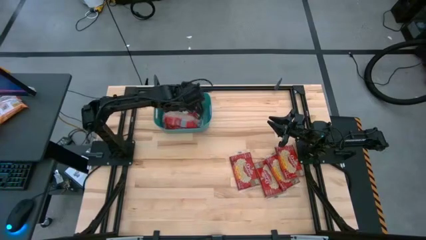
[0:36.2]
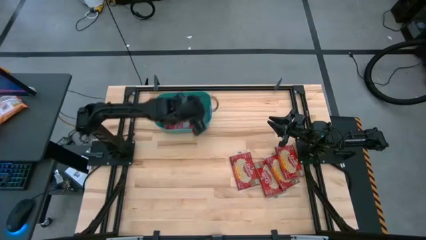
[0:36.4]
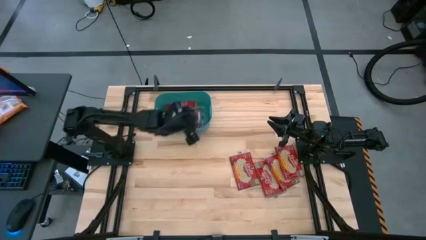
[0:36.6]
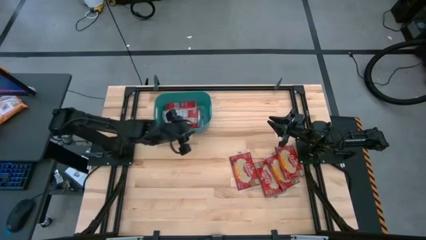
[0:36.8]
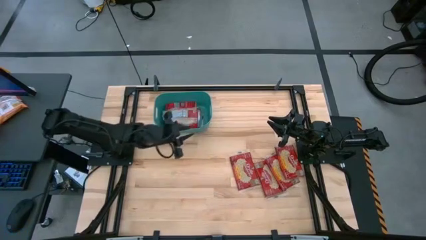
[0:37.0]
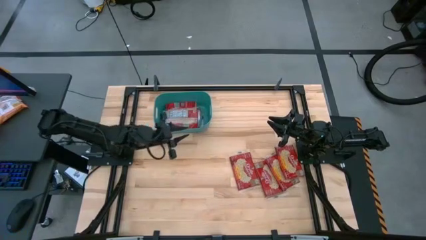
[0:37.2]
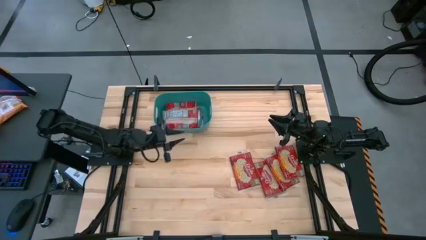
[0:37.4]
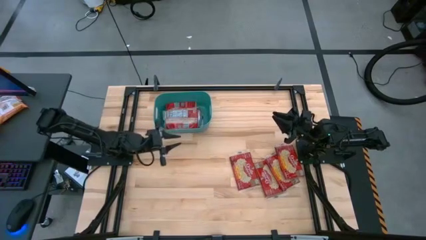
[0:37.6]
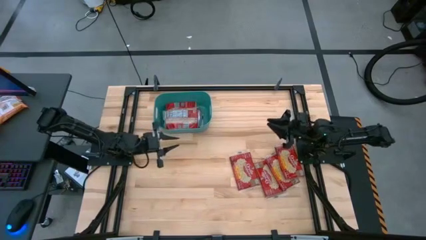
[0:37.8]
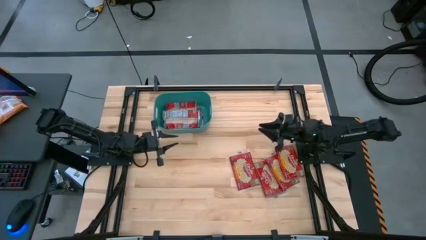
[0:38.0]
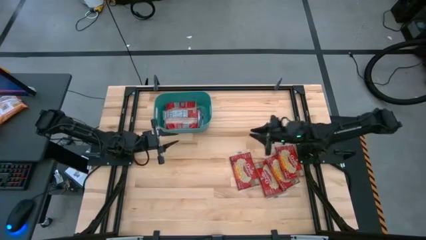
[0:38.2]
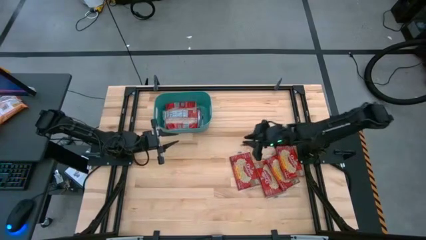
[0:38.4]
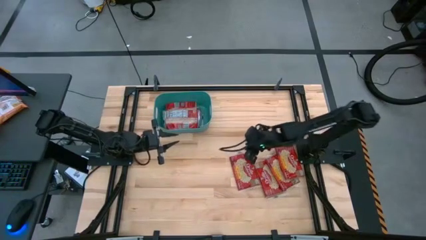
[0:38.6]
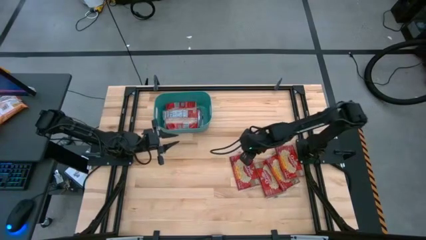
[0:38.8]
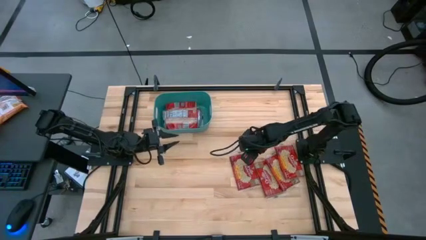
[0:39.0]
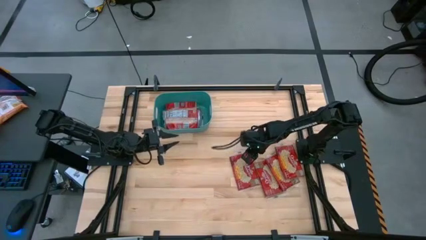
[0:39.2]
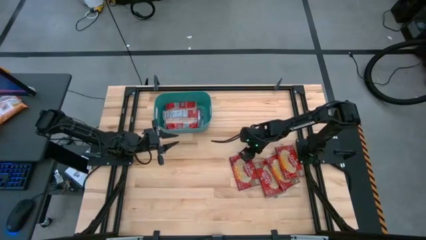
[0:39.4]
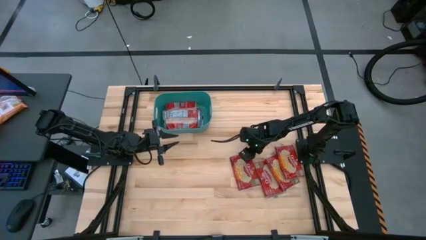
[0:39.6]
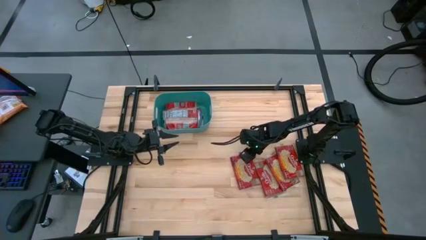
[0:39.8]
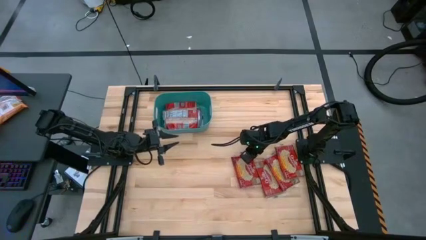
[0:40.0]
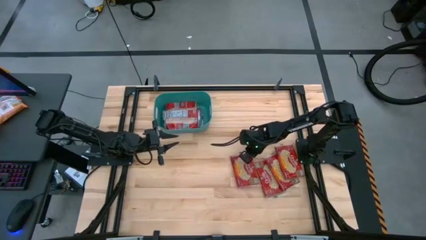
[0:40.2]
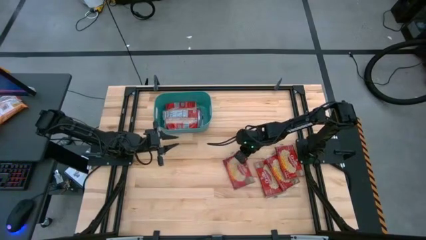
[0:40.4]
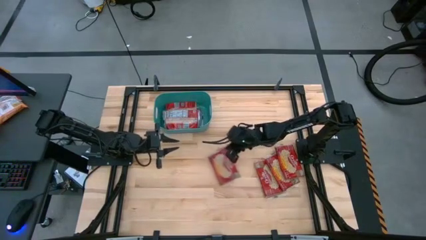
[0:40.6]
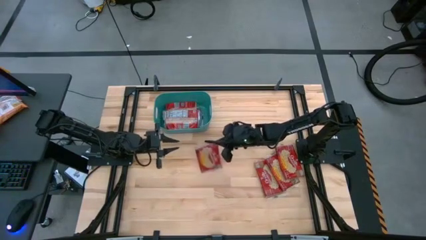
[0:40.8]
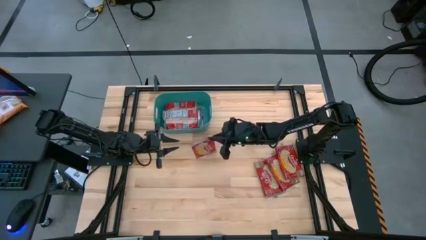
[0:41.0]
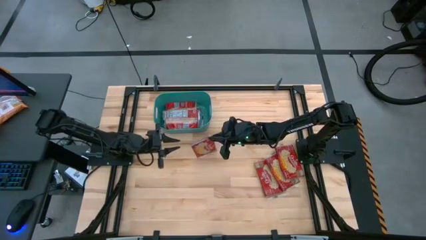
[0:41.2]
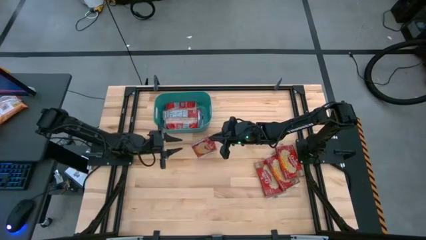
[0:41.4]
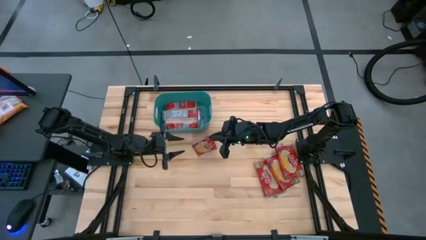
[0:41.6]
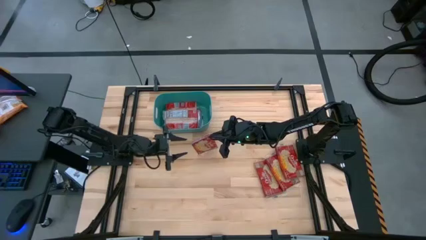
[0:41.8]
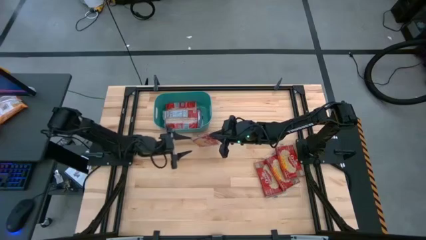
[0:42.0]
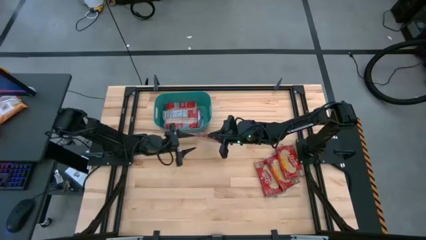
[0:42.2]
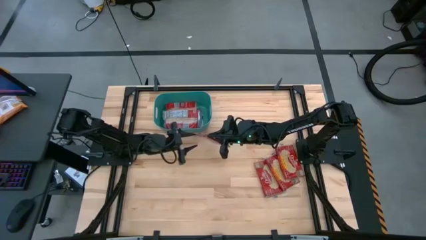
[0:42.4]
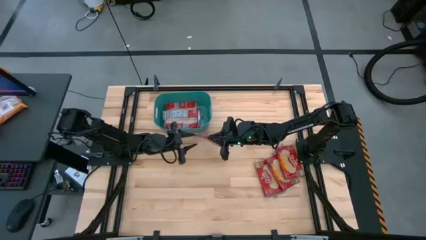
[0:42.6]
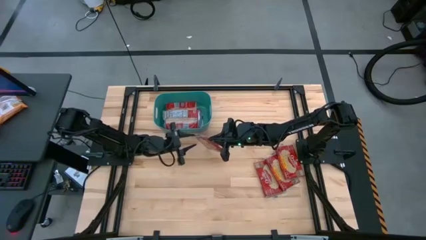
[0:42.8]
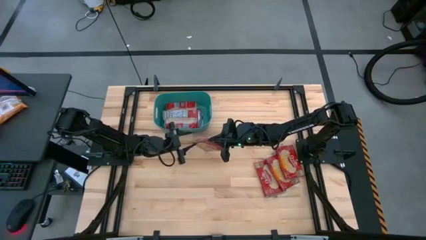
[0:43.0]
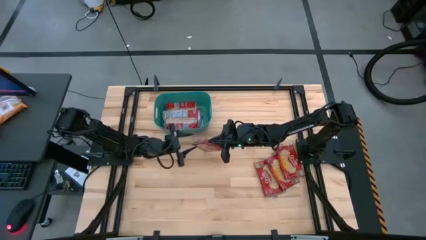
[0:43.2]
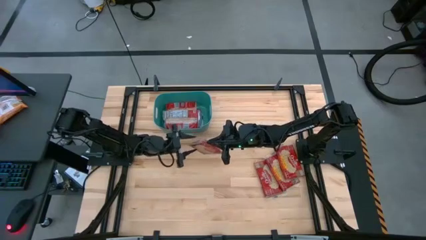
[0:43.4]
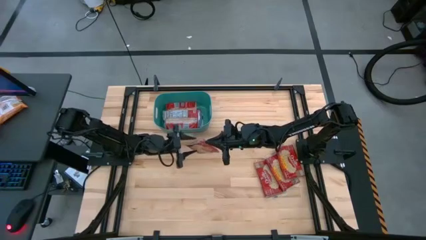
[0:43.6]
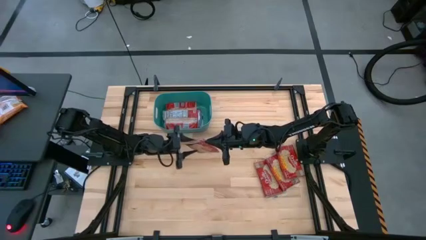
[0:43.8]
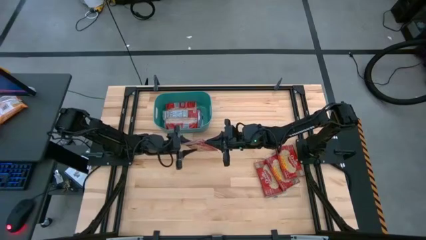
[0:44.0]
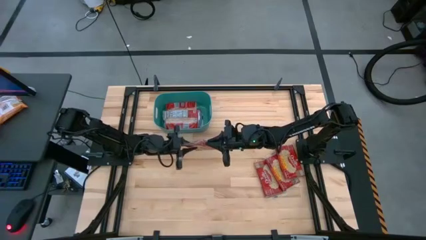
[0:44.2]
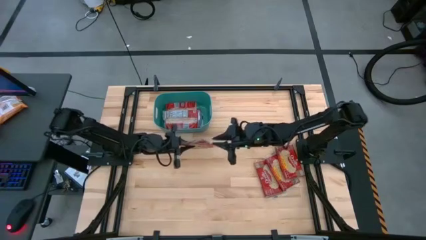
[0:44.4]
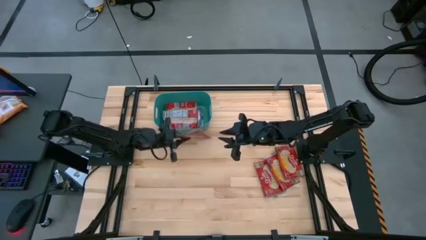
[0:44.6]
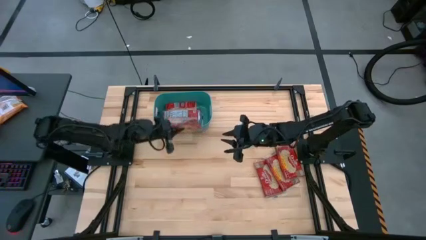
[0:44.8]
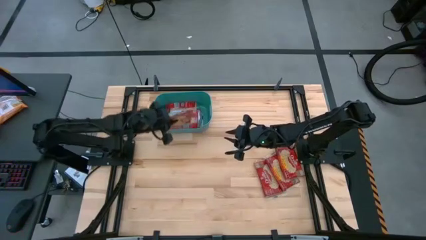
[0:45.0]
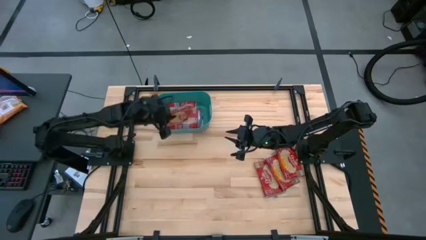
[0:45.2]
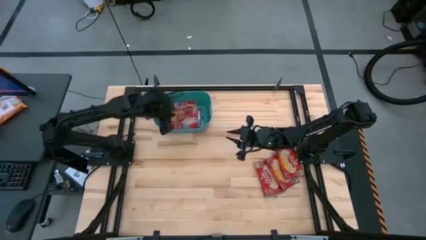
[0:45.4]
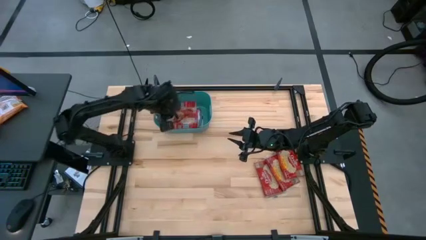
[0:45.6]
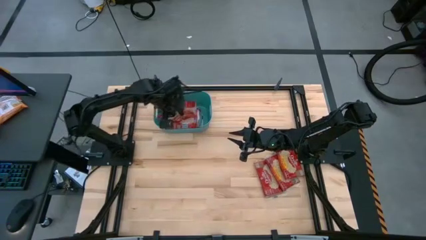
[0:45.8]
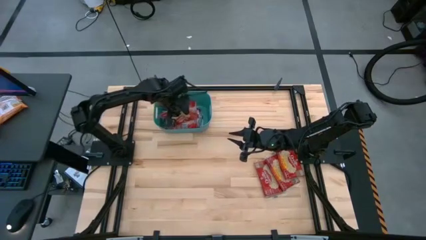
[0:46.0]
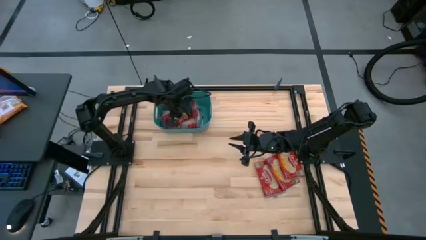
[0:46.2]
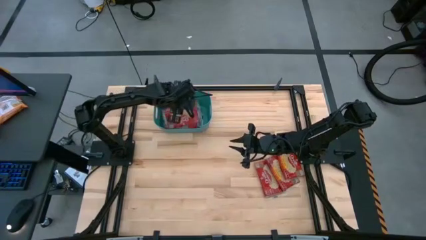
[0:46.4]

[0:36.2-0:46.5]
Task: Sort popcorn bags into baskets
Put the popcorn bag into the green bin

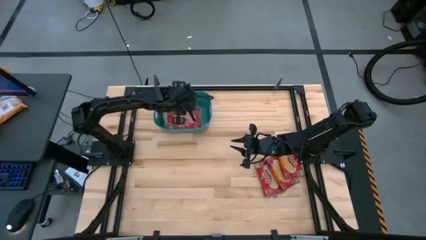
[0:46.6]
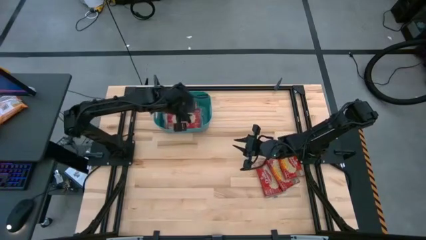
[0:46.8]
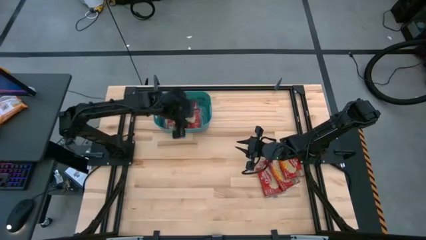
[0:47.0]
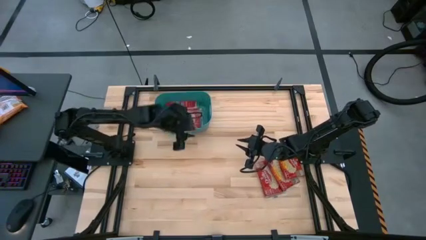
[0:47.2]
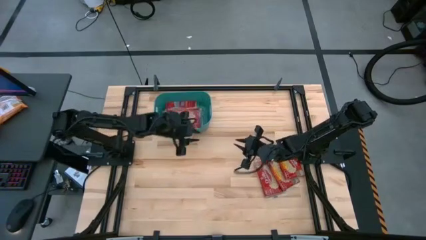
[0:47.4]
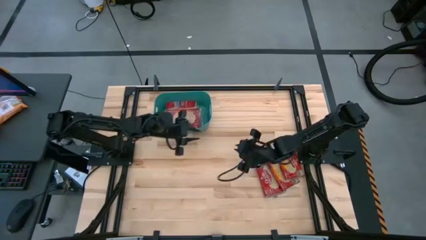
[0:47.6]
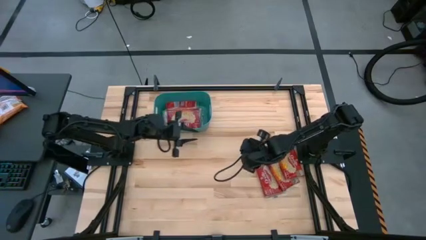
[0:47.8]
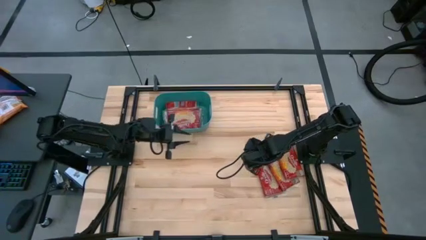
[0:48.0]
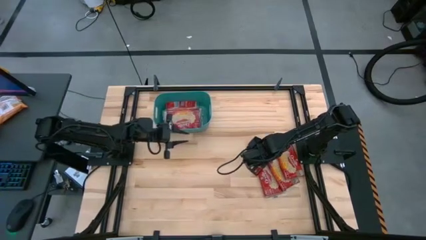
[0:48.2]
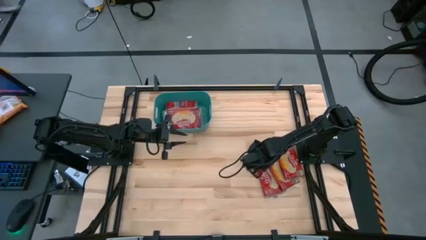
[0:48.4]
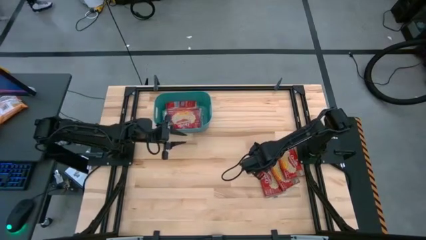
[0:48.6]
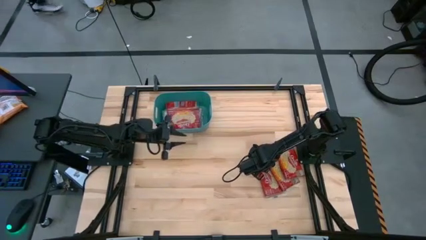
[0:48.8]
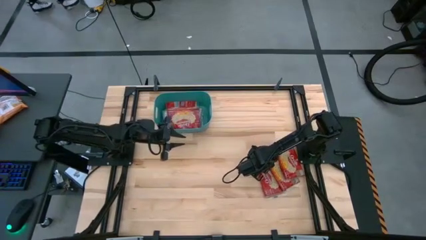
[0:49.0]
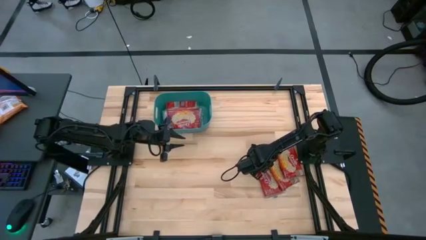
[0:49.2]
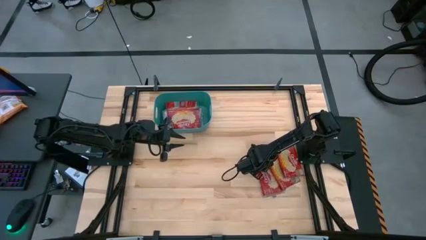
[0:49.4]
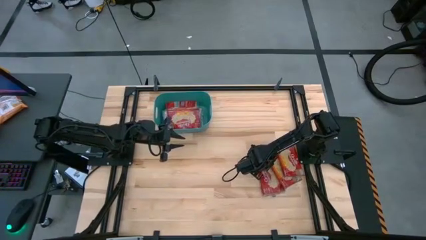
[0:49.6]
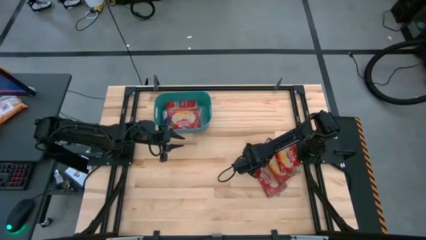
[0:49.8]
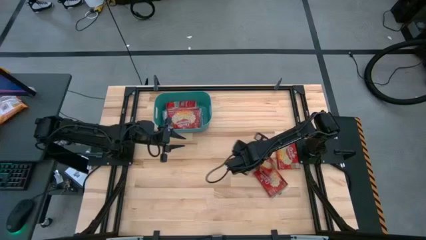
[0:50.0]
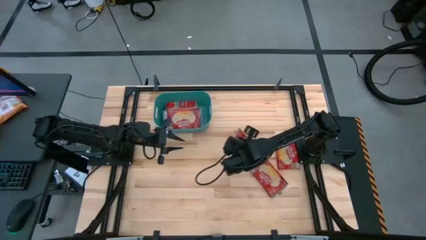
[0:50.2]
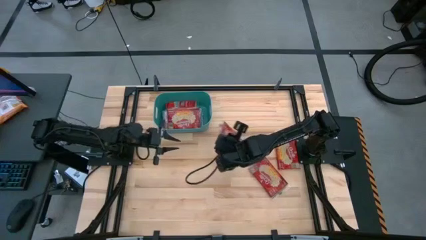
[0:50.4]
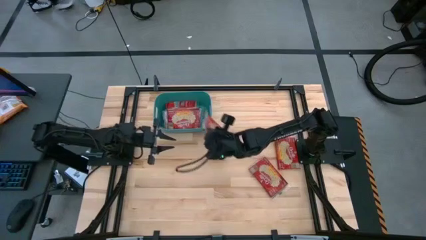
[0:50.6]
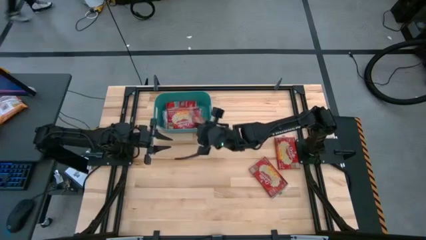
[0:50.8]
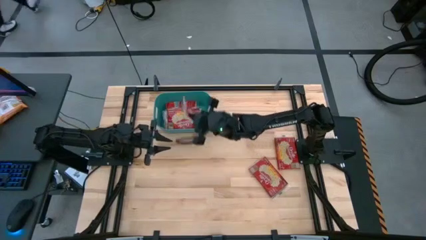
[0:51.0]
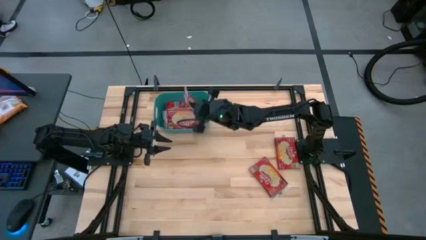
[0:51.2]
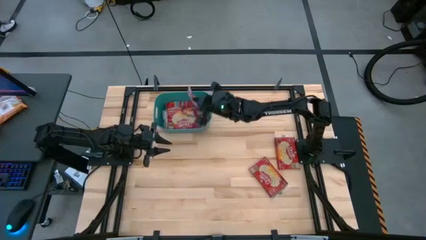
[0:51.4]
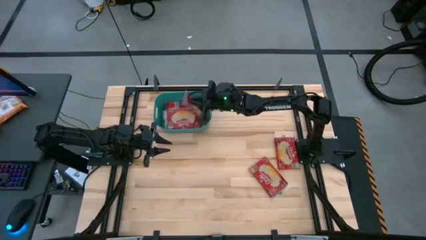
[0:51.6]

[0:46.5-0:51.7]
Put the popcorn bag into the green bin

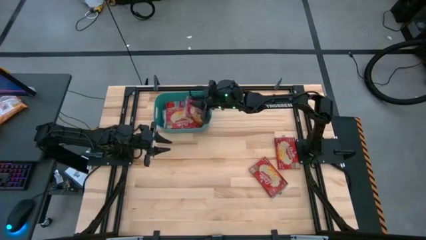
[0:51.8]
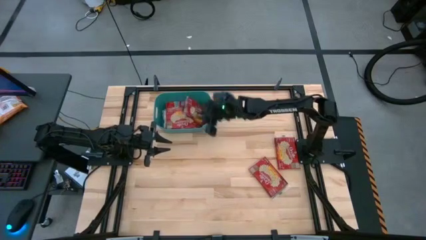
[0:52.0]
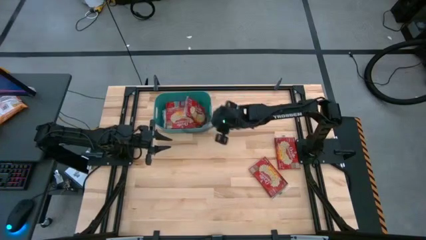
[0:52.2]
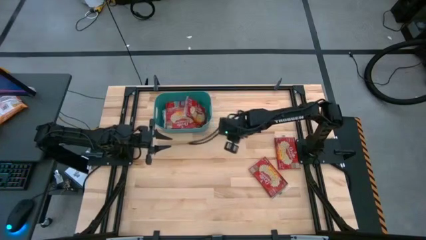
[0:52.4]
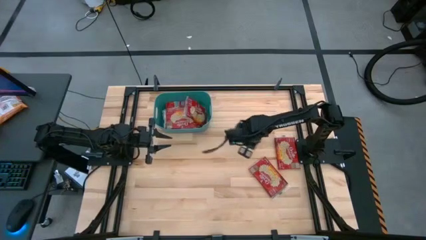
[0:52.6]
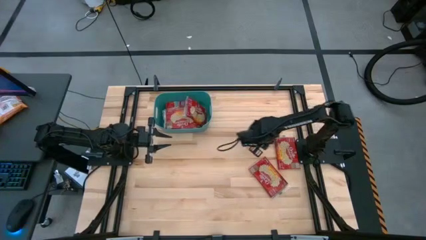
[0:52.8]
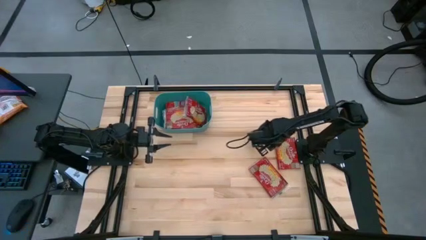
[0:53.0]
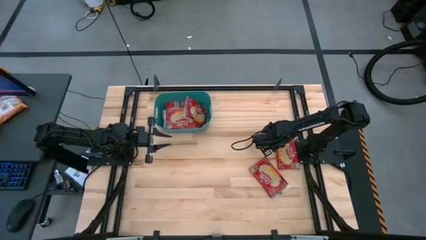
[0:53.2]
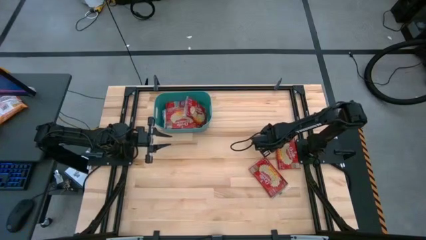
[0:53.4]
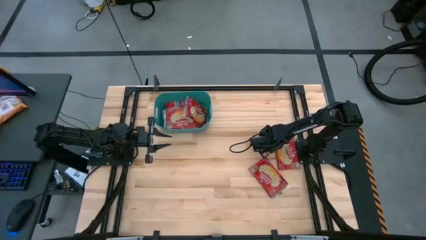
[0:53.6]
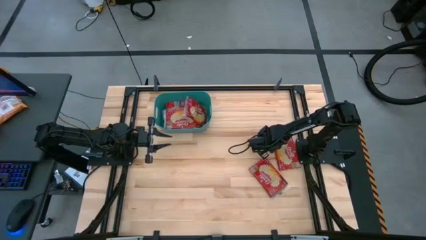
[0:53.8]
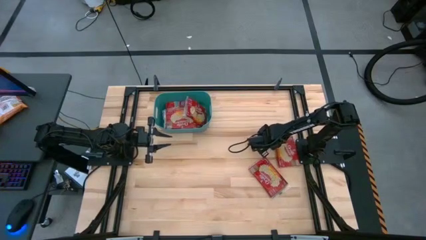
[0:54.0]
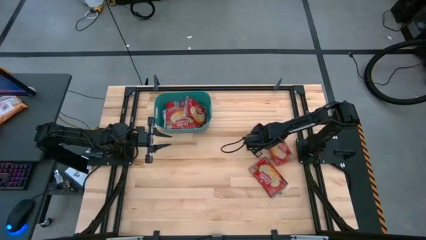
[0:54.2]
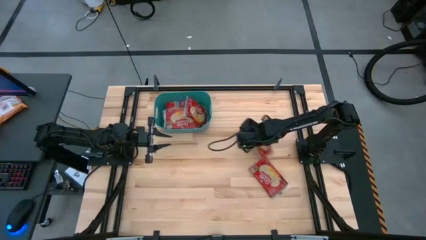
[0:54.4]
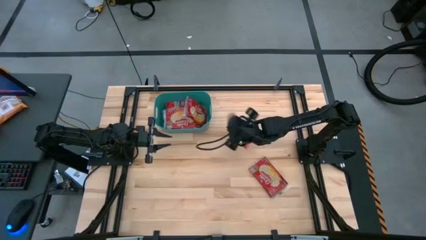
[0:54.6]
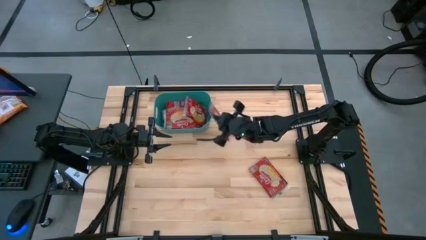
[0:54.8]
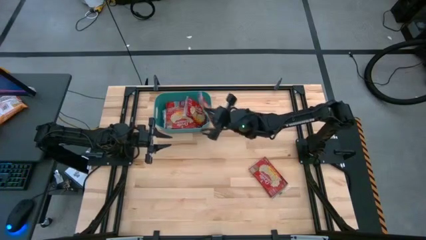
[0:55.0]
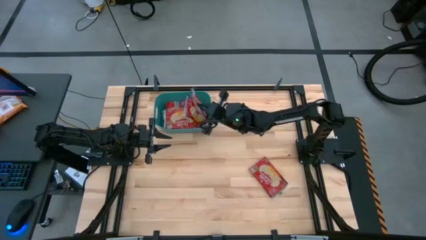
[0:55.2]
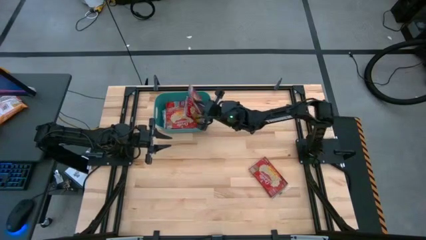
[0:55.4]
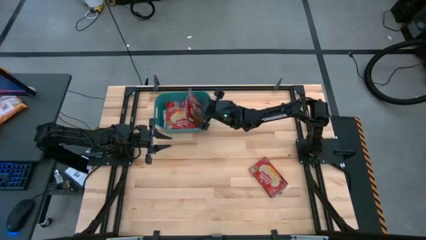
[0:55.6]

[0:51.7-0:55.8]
Put the popcorn bag into the green bin
